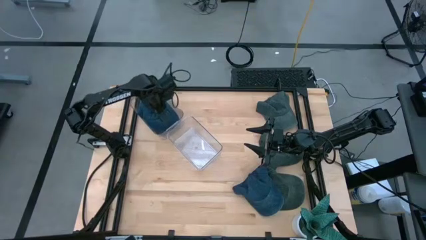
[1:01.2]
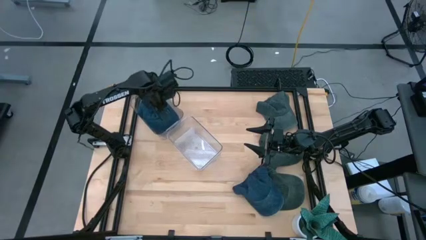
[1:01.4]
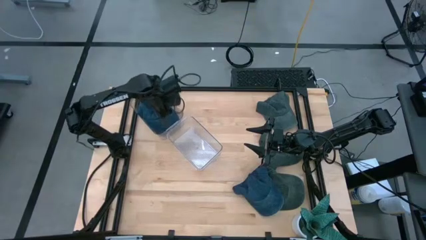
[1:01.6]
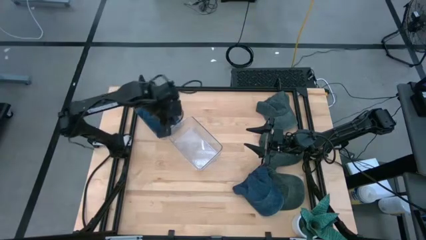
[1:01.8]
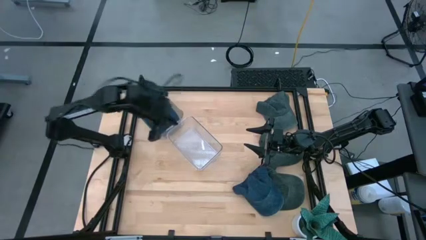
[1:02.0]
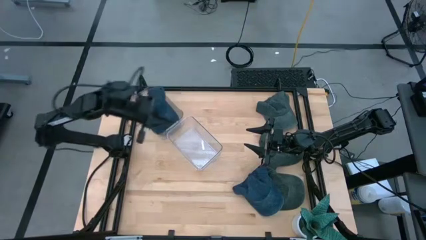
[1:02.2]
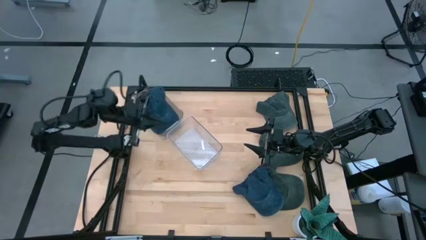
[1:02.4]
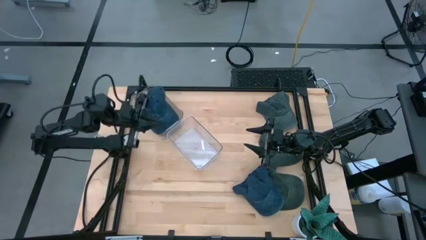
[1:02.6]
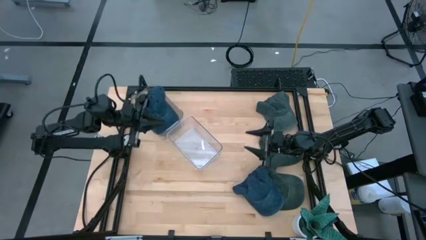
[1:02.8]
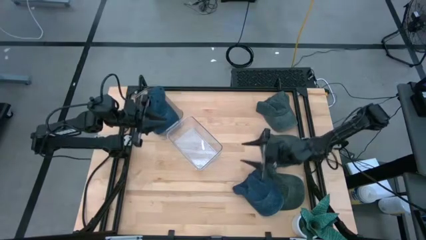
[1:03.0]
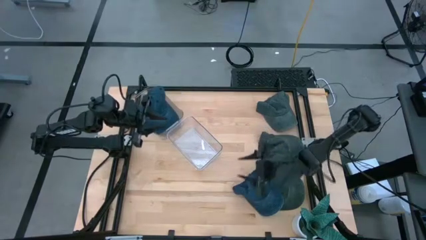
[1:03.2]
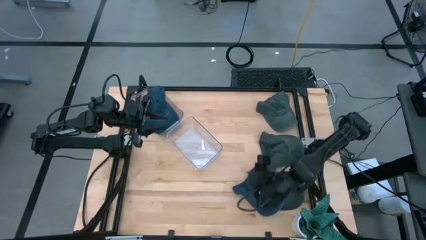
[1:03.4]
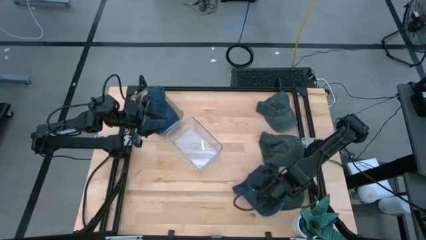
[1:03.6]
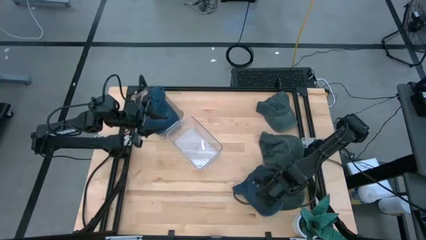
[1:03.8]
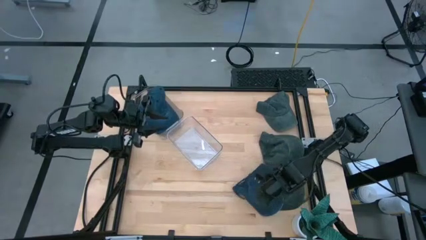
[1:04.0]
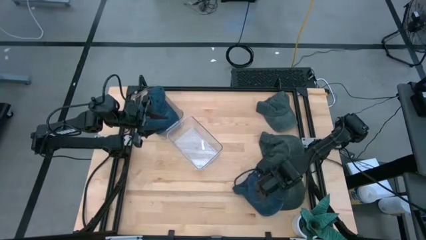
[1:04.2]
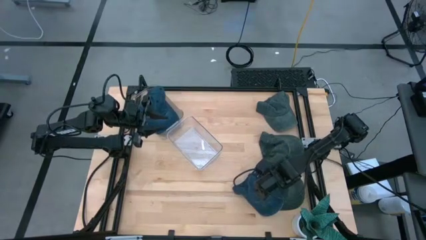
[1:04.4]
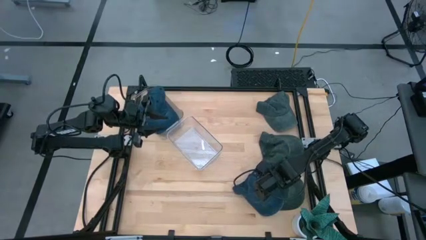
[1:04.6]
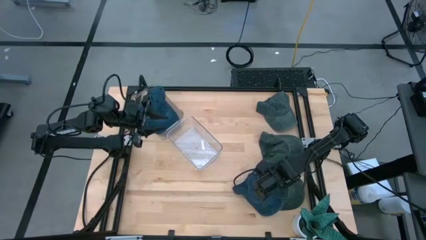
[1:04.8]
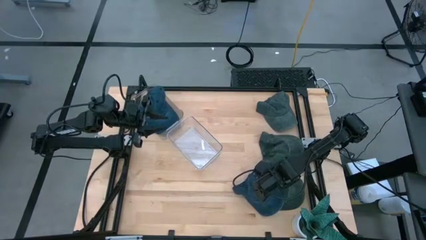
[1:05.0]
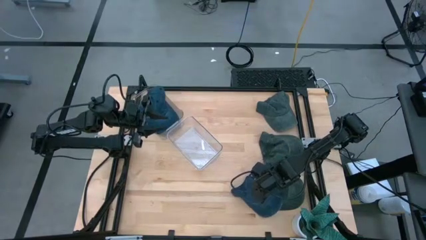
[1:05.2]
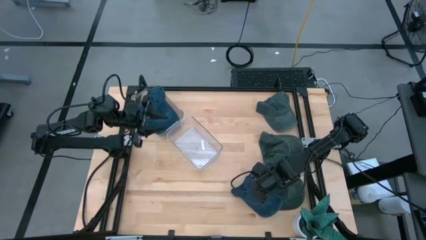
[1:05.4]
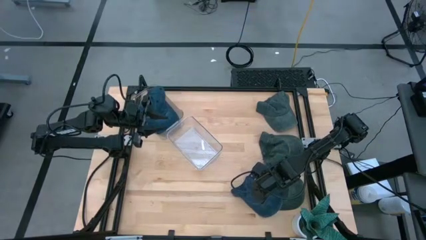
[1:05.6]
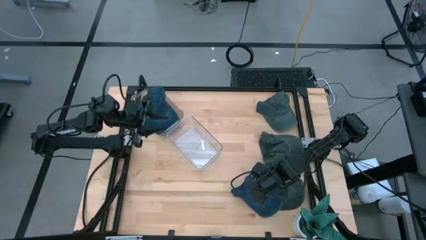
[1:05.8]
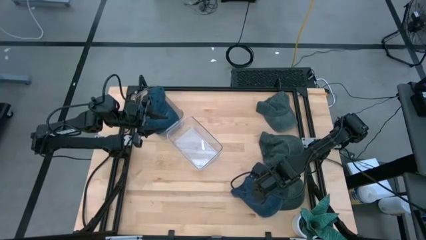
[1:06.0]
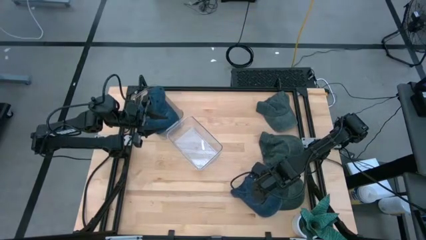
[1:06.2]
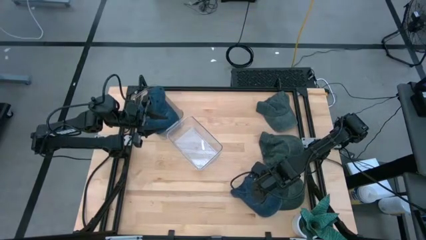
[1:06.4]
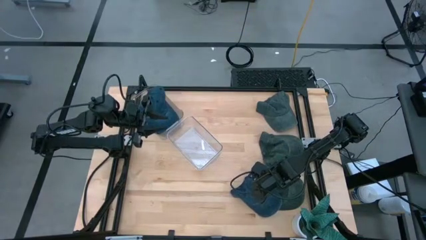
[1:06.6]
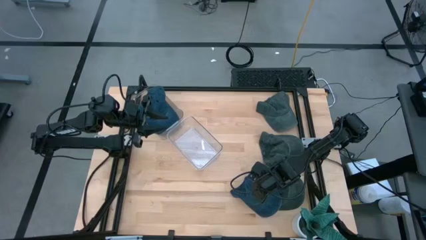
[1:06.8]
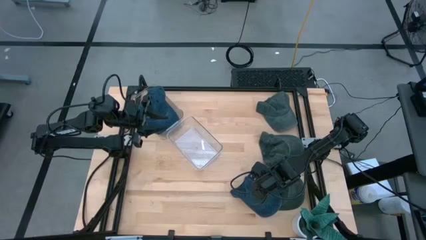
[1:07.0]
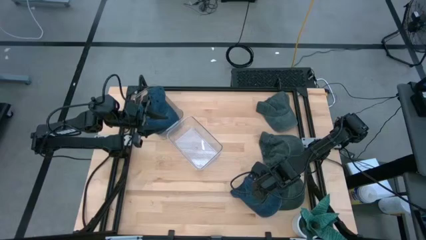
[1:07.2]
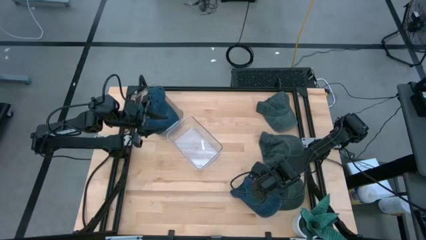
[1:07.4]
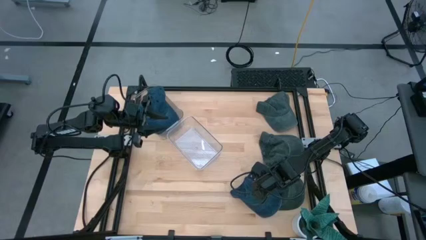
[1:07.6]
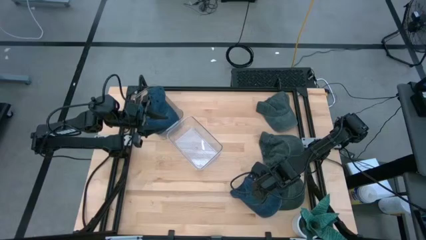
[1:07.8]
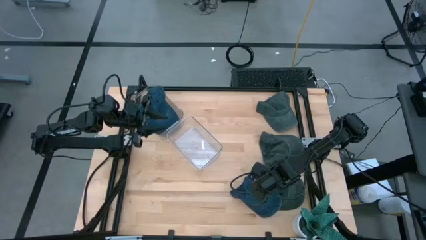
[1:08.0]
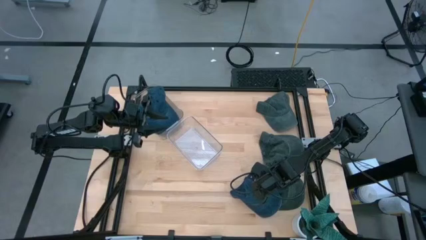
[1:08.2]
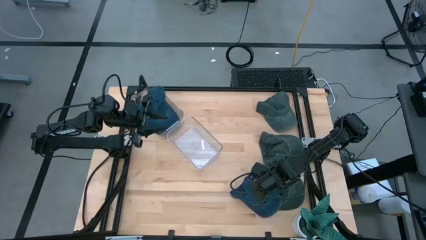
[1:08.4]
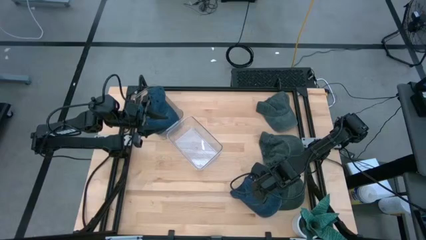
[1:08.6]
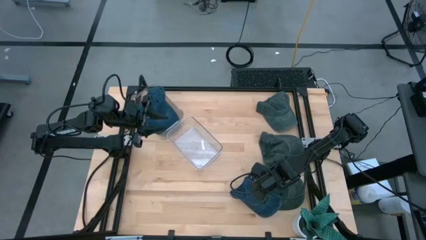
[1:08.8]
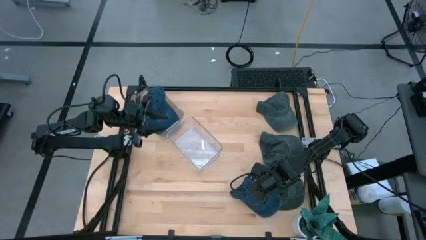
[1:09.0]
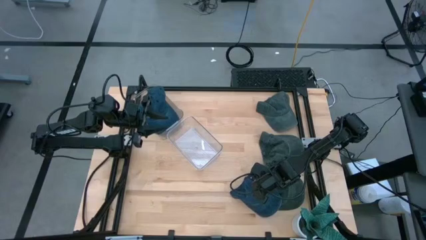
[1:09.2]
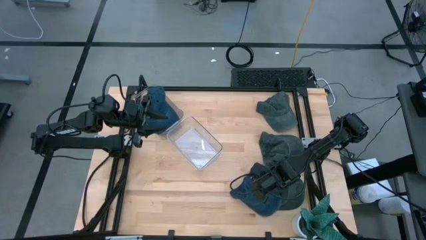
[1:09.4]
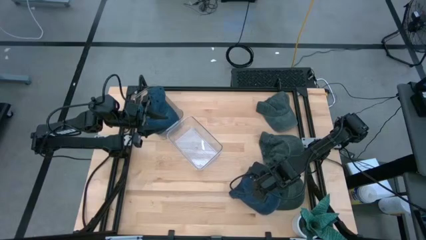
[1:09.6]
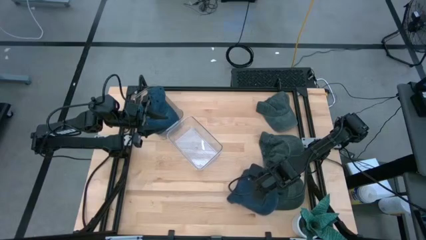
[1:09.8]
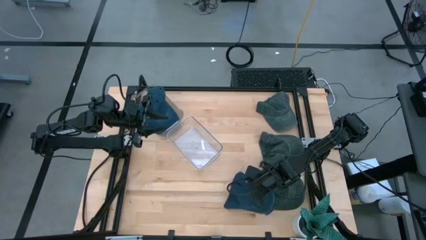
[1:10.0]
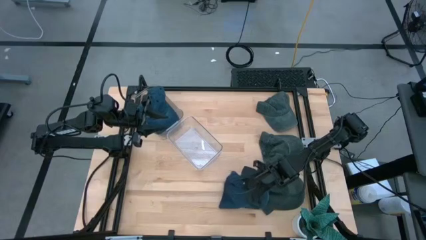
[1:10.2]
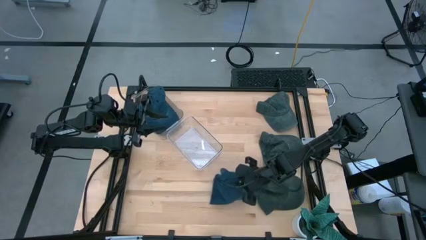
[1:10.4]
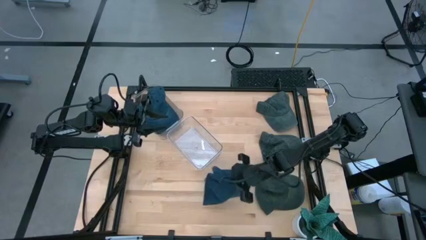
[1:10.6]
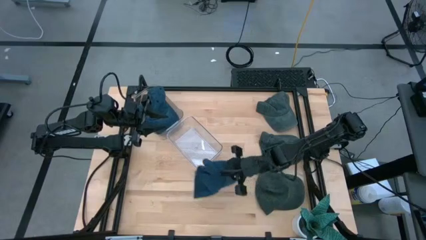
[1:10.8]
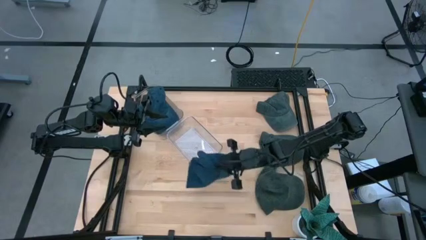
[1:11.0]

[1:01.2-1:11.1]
Task: Pick & Place hat
Put the blue cap into the top transparent bin

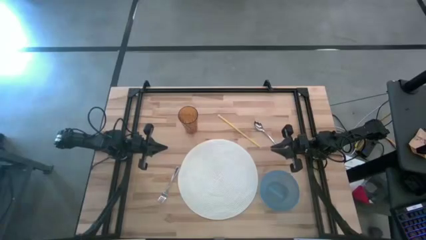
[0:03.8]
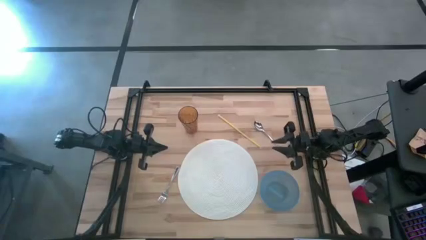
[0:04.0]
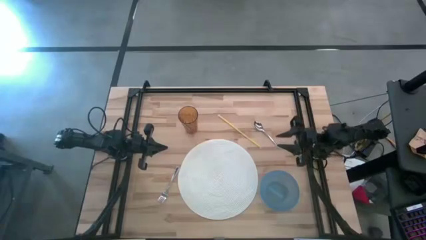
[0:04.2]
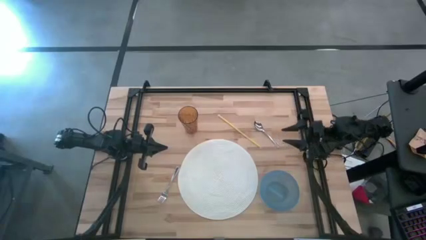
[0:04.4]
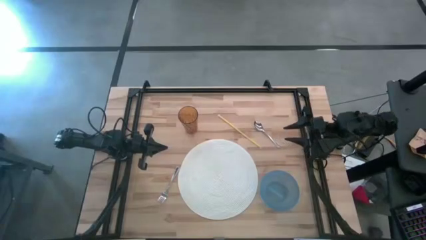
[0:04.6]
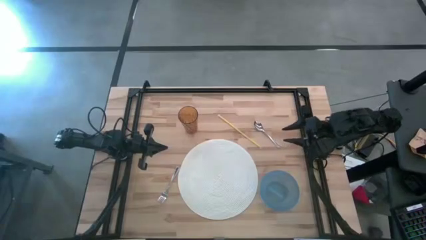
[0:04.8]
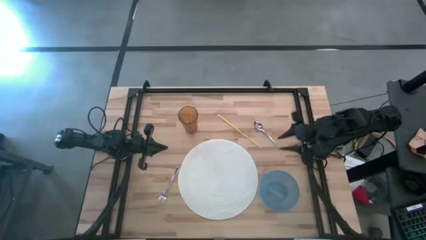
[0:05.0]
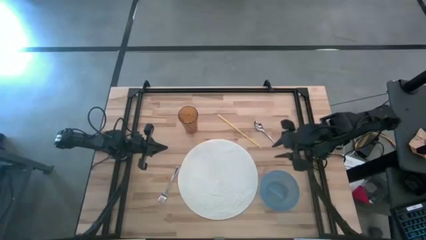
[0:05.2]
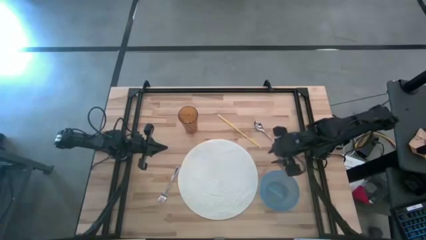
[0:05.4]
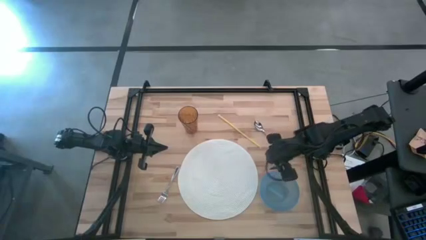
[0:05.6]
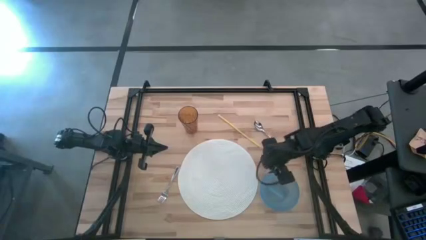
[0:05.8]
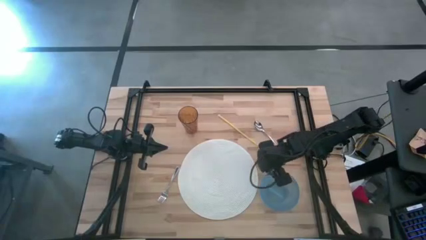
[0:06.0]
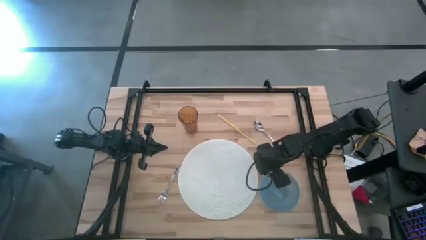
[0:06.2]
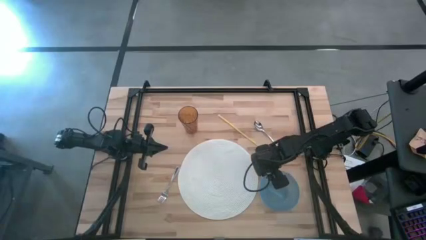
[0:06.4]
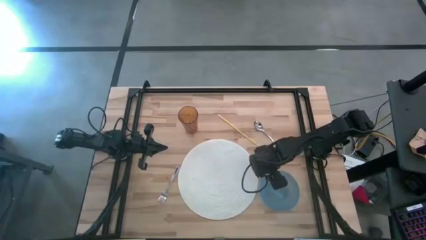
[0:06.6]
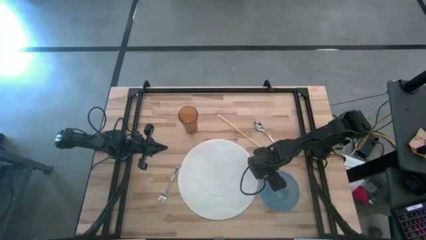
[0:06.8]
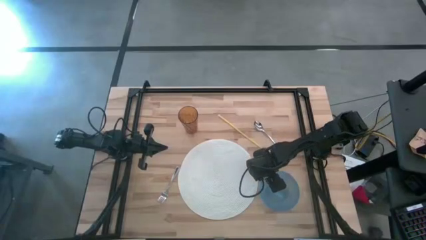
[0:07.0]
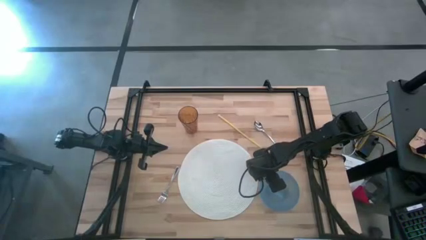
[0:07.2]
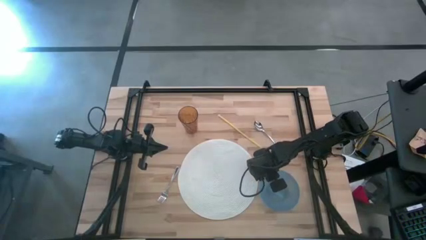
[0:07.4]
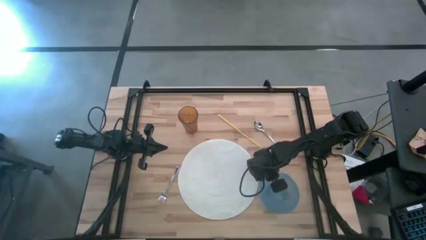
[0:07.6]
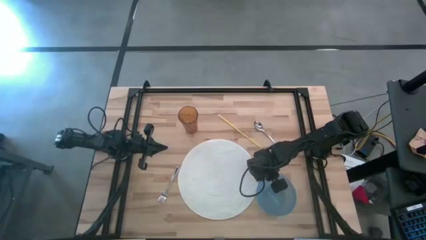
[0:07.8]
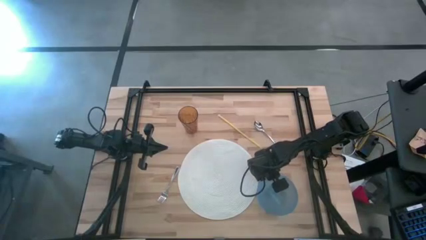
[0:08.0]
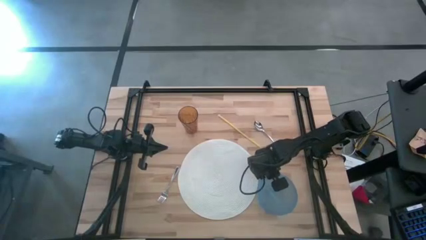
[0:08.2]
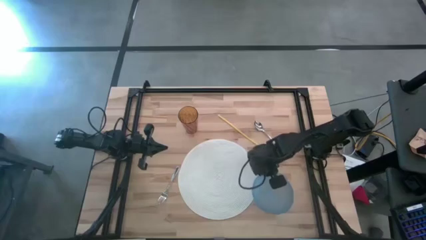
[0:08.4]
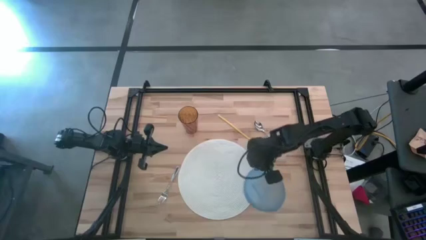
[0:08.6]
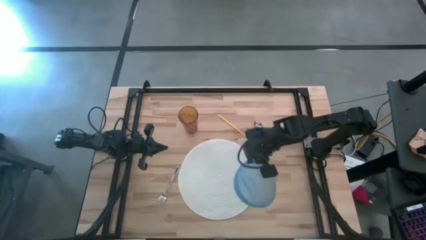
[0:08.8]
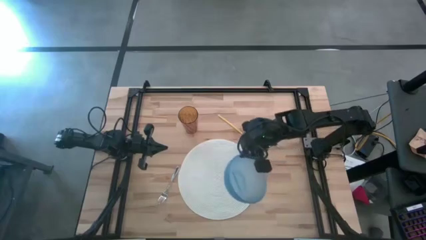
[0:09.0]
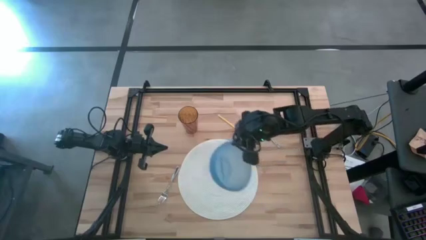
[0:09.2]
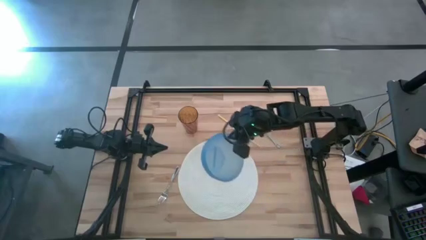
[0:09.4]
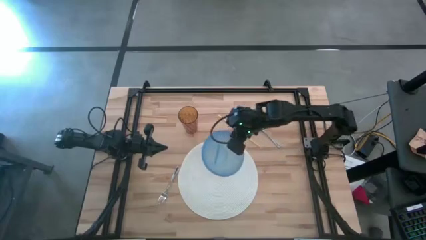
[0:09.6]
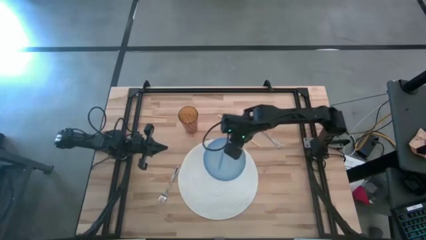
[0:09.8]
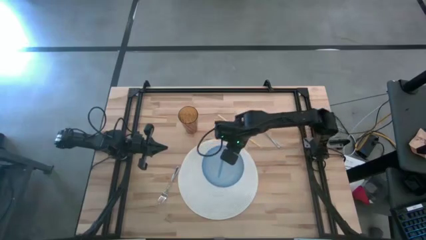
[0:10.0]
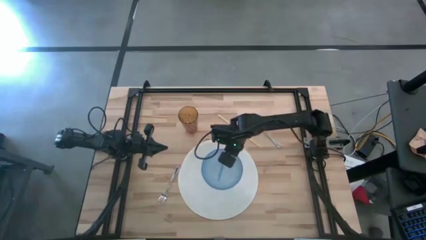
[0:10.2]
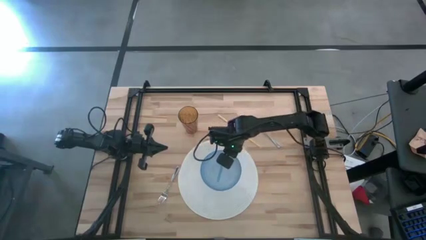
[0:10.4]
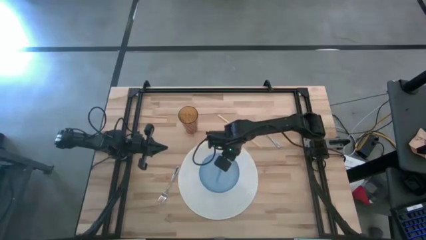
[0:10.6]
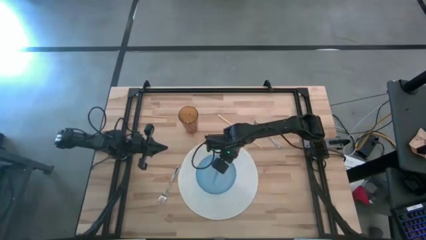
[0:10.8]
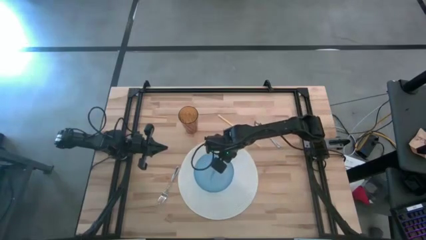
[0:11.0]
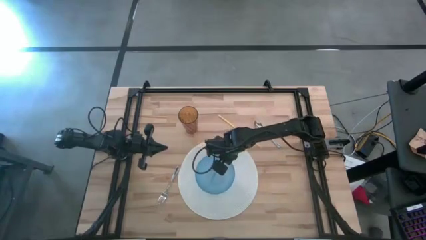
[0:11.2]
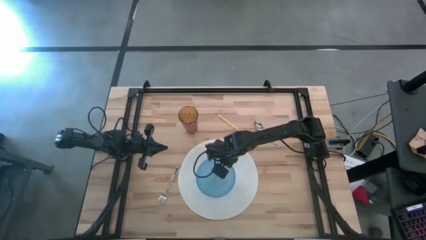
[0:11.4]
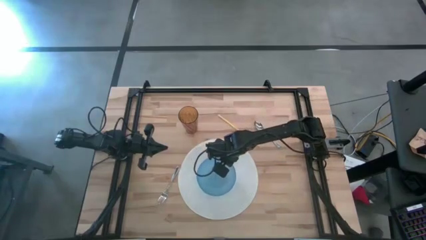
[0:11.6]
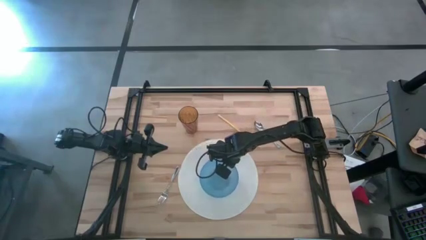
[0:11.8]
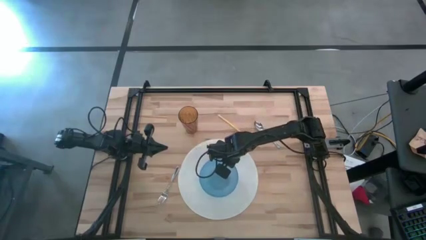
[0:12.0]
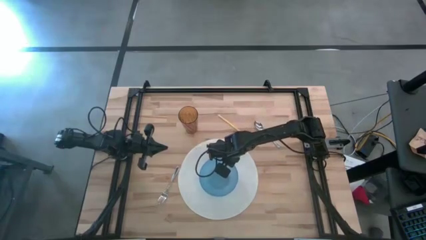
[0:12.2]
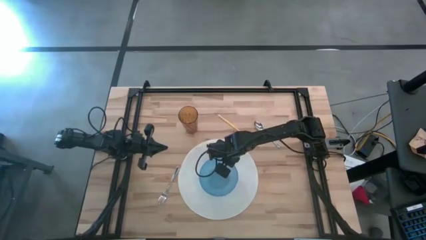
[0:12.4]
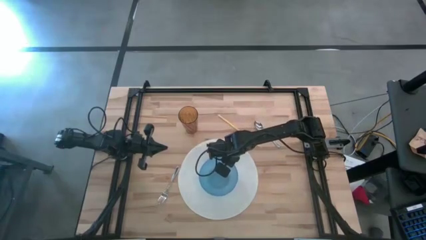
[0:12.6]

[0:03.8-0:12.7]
Task: Pick & Place Utensil
Put the blue bowl on the white tablemat
